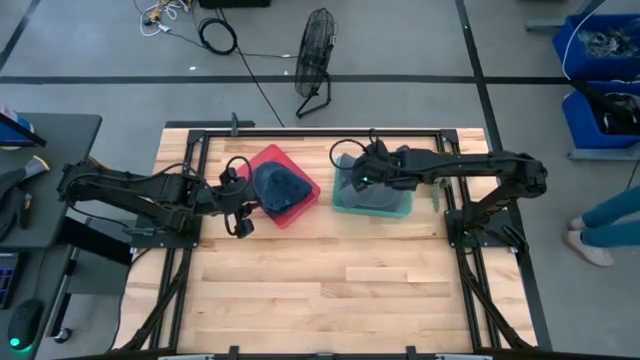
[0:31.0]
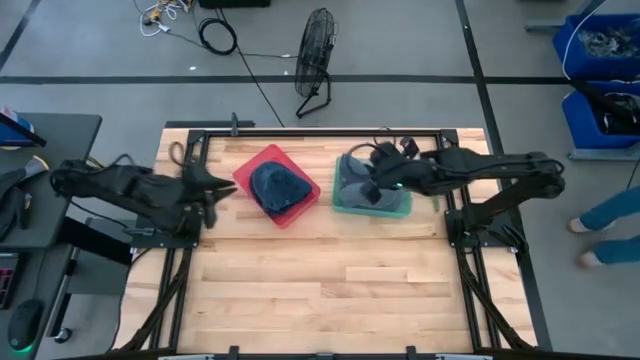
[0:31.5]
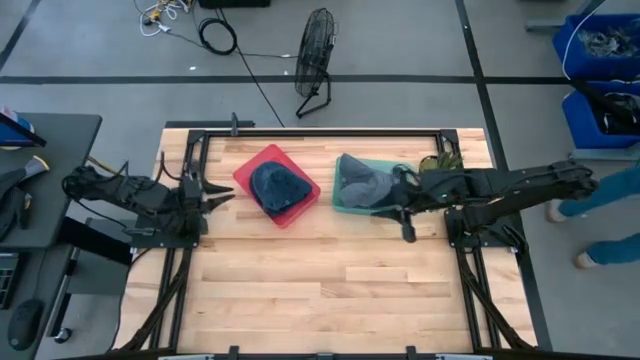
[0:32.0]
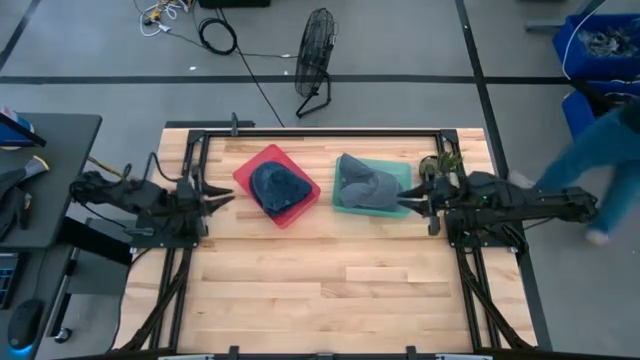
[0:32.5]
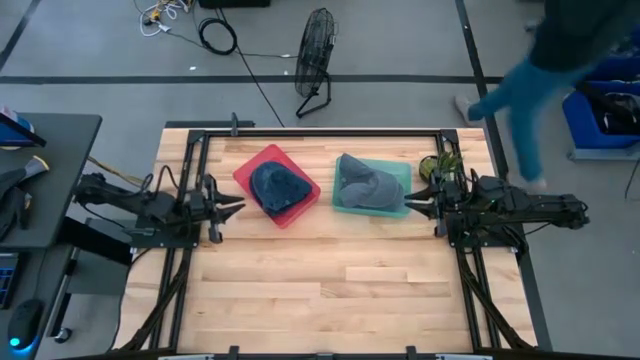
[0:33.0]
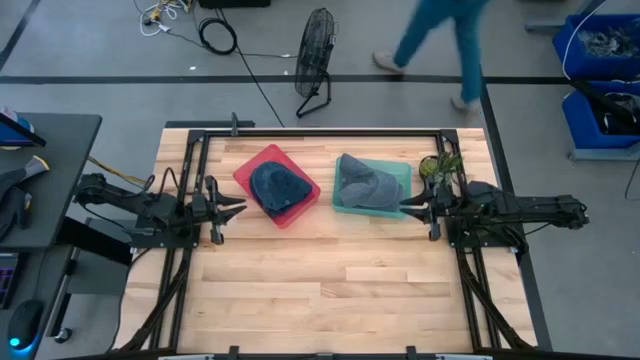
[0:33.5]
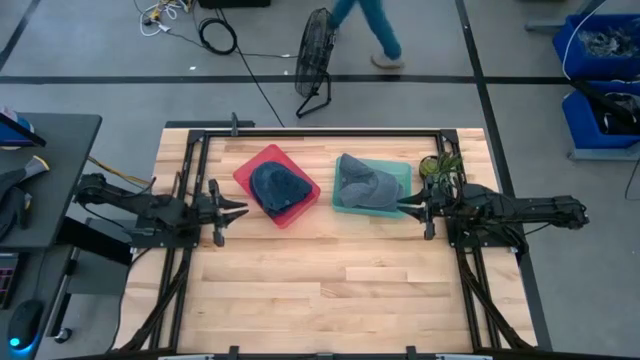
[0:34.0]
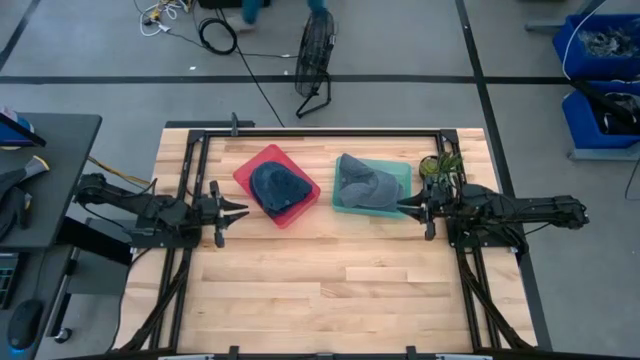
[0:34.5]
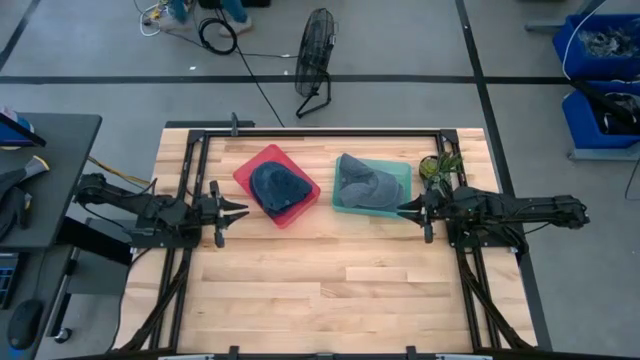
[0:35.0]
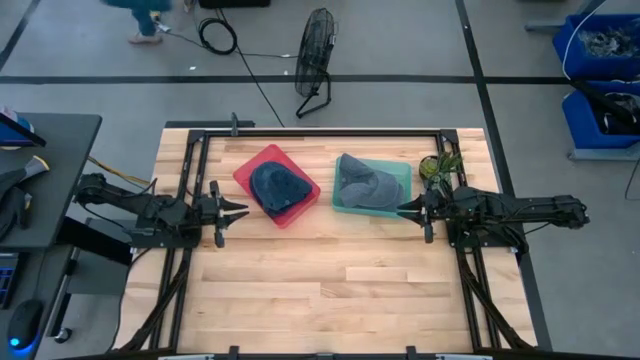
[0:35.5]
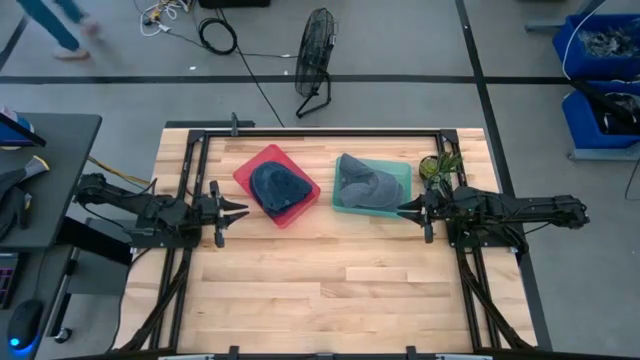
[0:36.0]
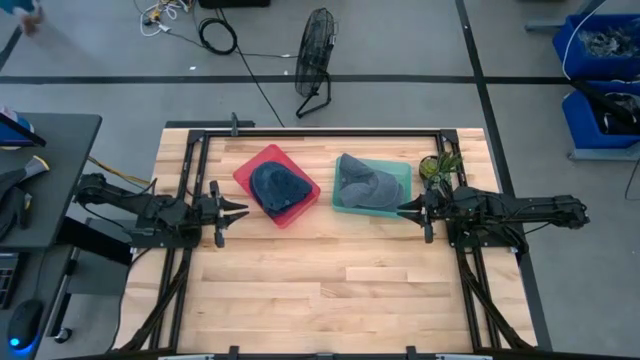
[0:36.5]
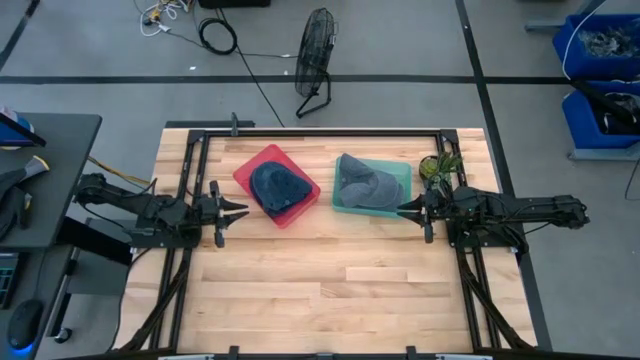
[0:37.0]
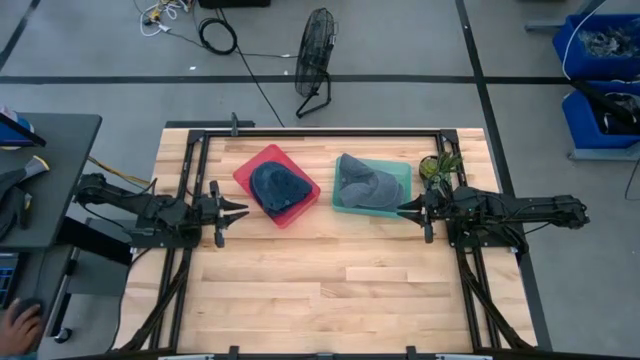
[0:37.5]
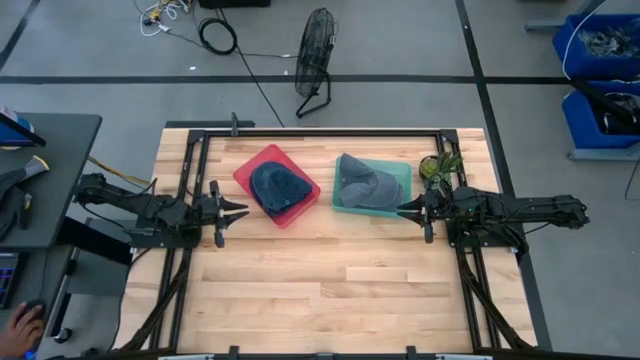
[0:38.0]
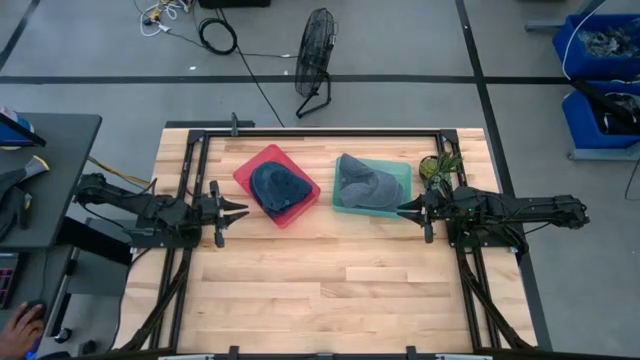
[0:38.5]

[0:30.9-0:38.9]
Task: Pick & Place hat
Return to Home Position

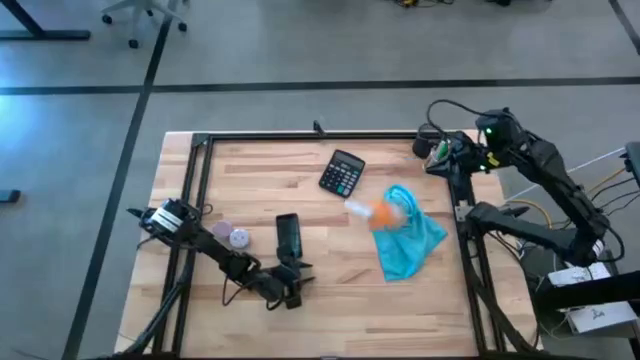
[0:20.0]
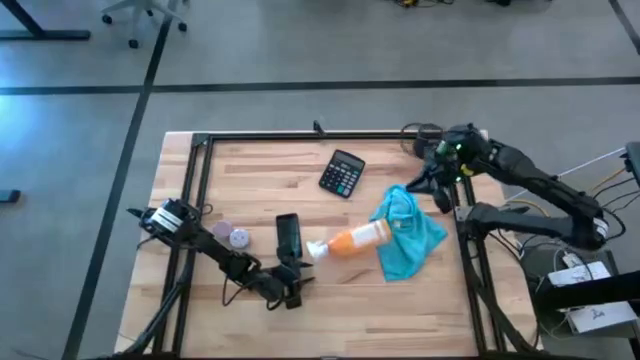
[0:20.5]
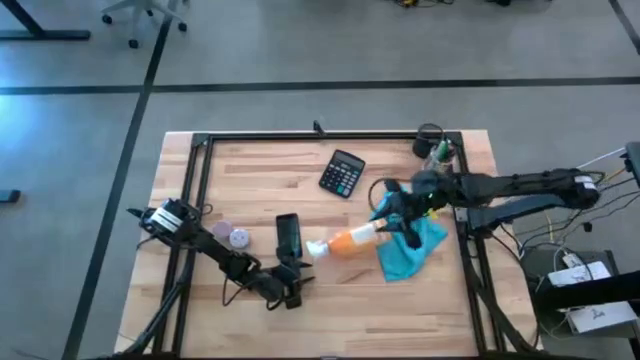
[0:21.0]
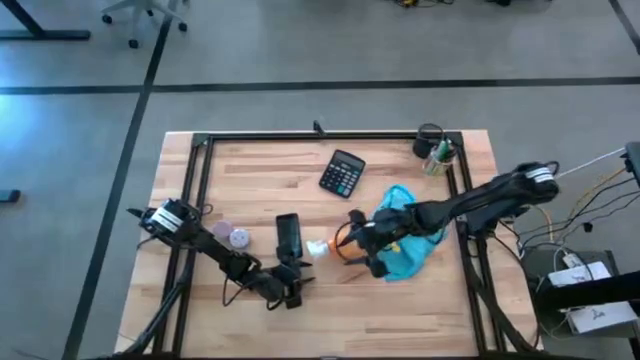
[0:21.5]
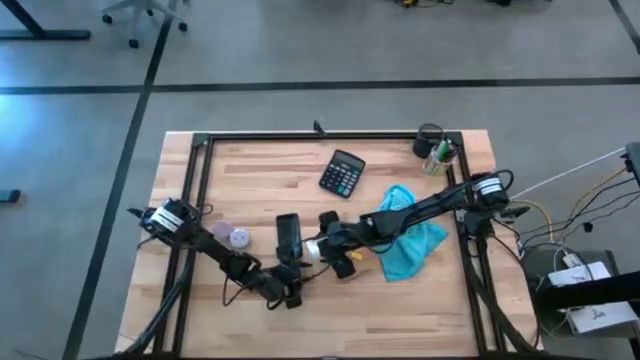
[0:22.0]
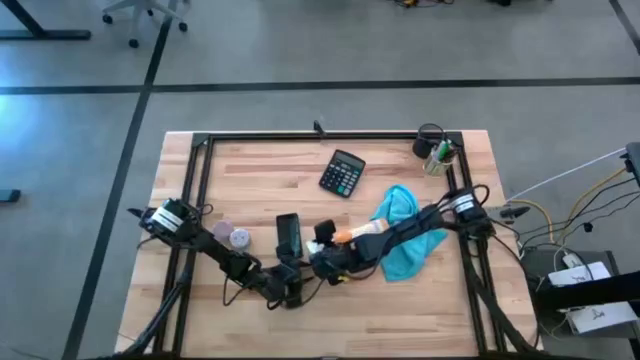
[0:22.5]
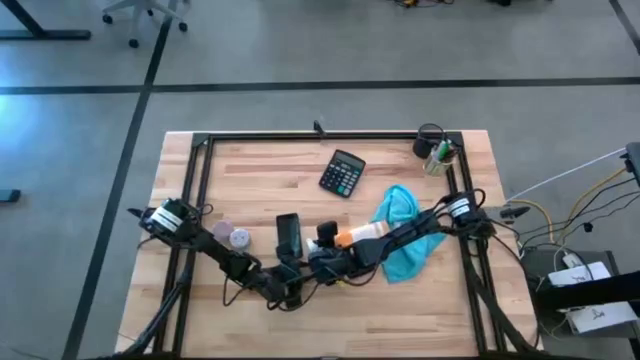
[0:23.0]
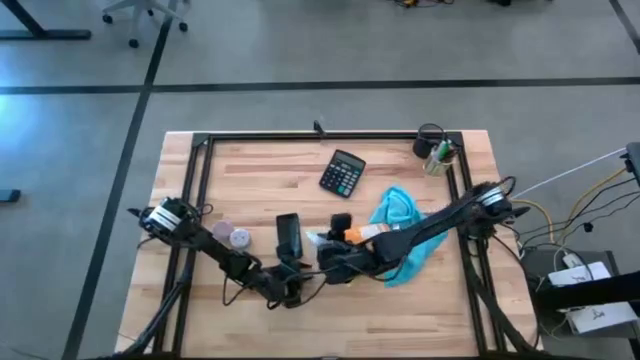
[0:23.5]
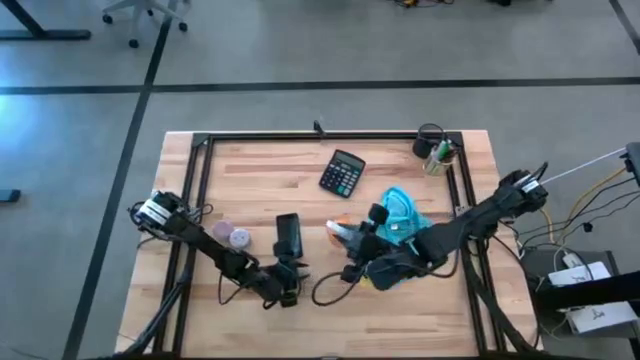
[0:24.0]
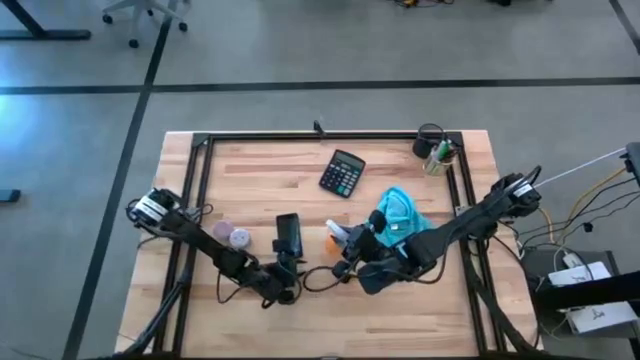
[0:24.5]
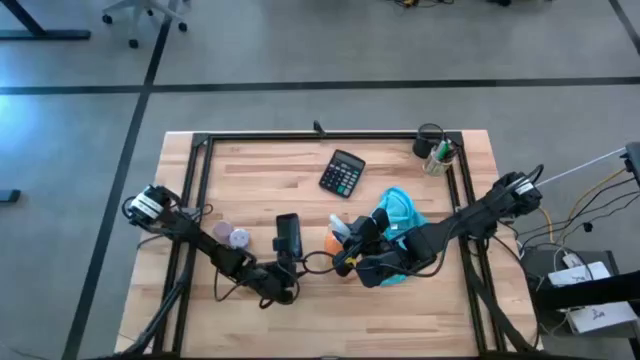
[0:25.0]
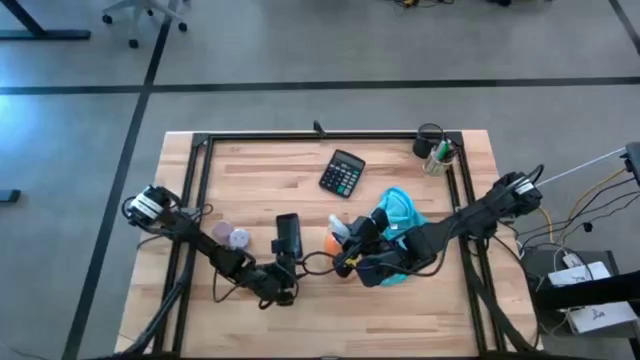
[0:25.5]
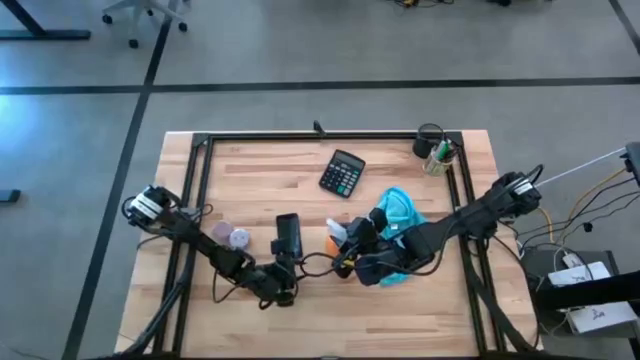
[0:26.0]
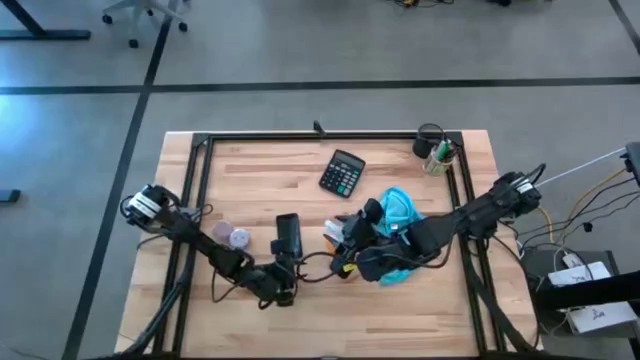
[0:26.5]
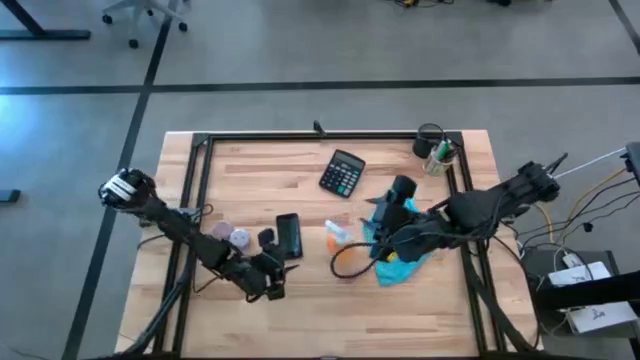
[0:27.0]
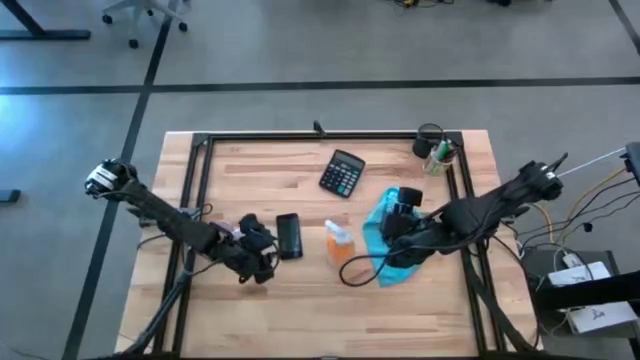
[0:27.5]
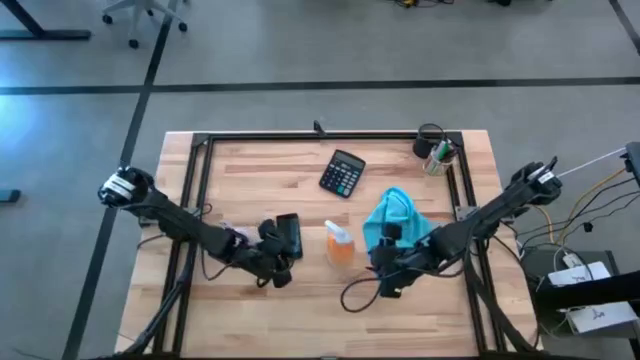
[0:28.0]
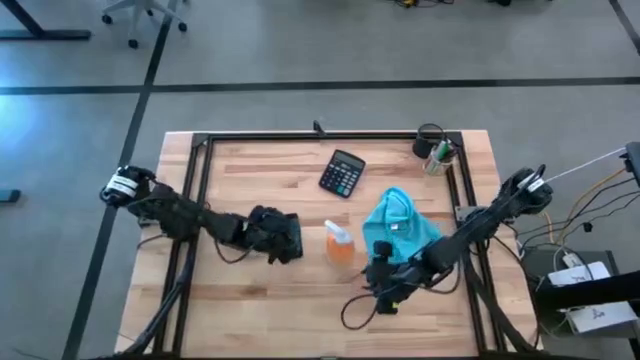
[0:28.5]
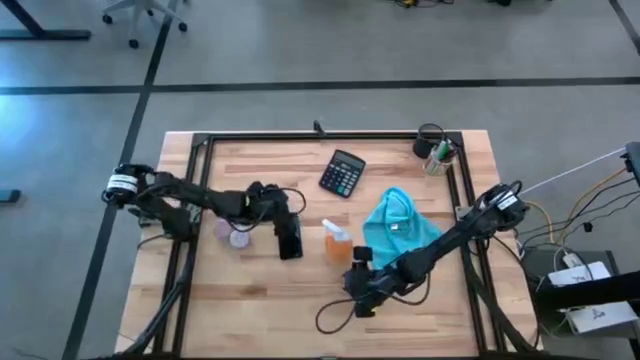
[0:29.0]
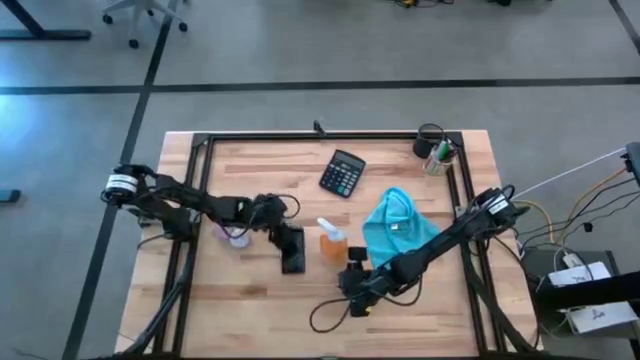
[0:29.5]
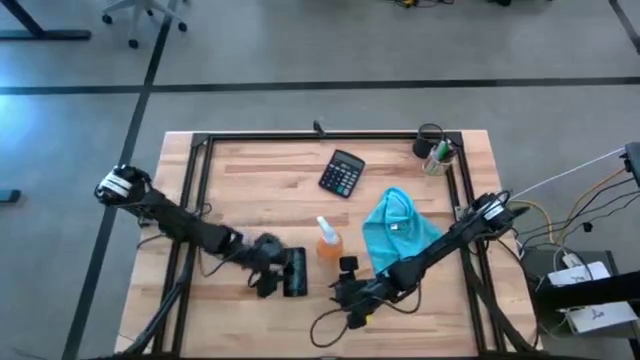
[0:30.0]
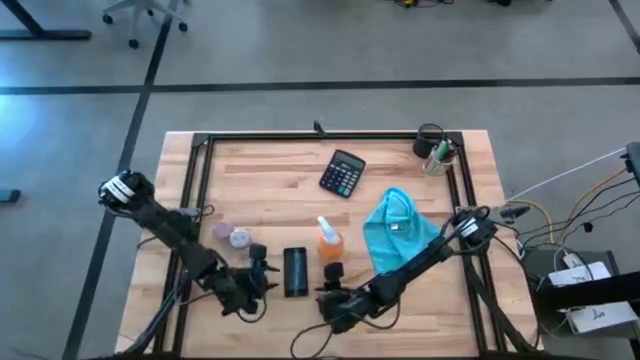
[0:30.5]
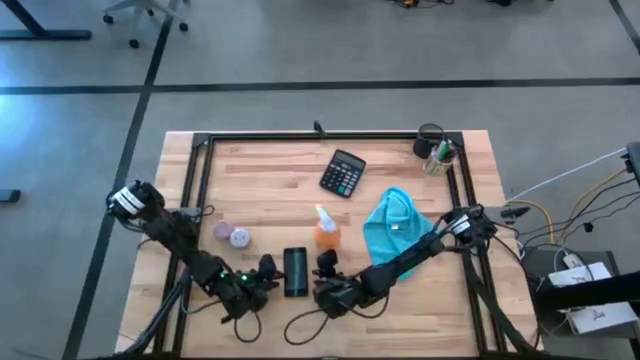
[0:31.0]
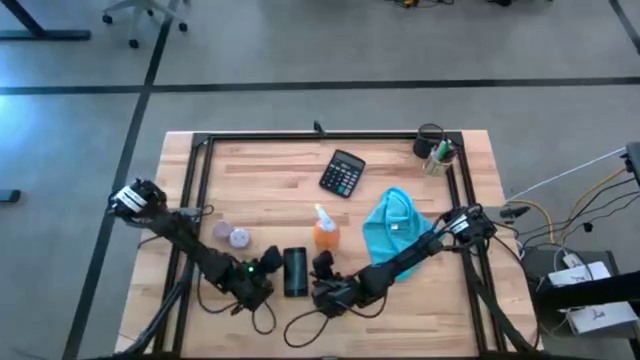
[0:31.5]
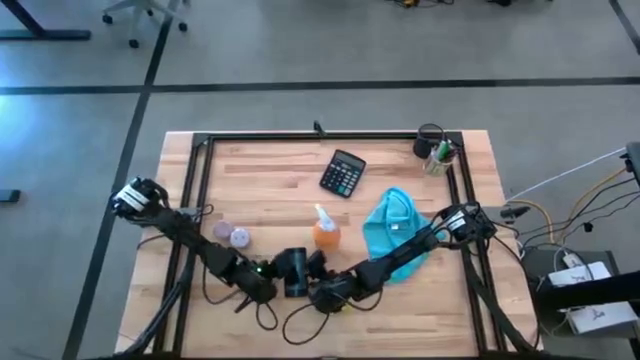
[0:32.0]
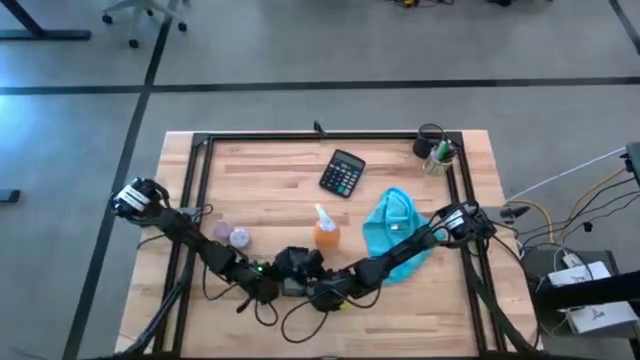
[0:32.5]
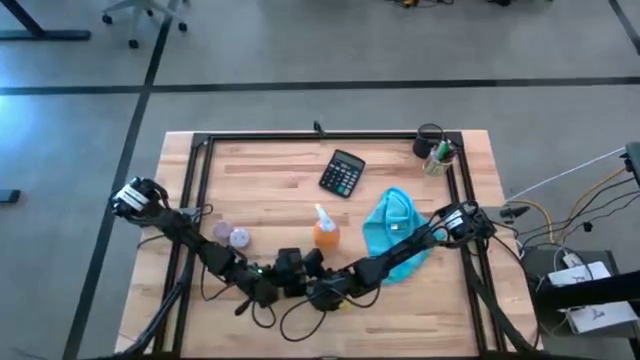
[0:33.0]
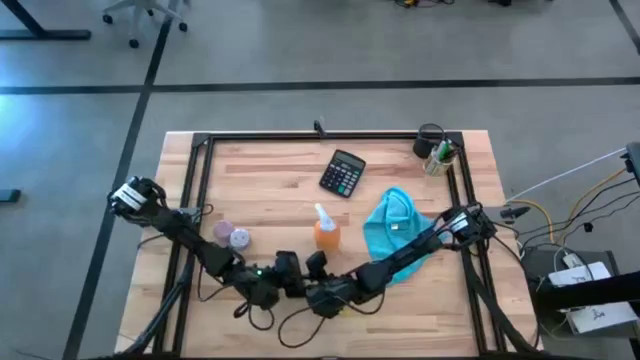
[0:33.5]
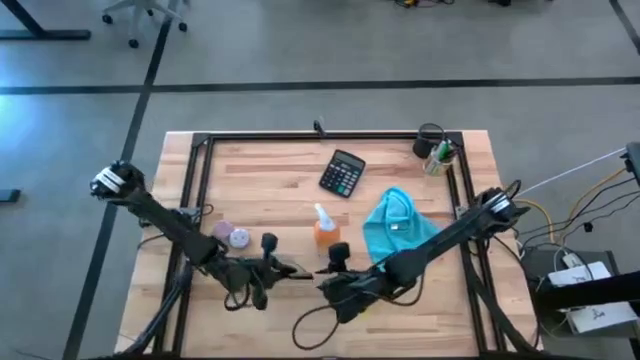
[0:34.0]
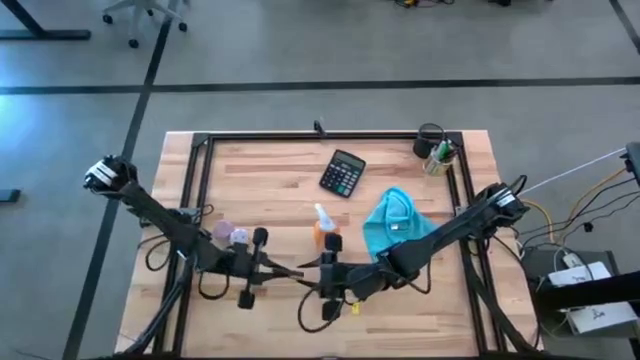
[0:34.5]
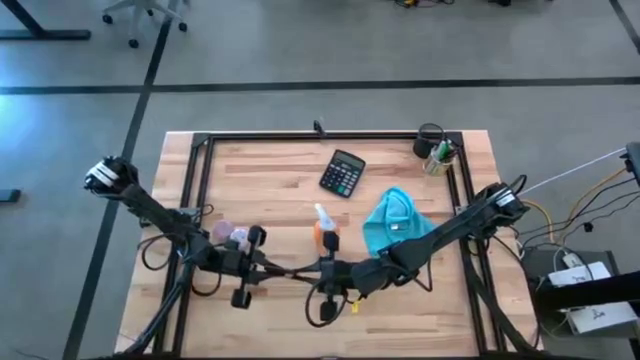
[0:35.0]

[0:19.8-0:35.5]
Task: Apply microfiber cloth
Spray the front and back of the cellphone using the spray bottle
